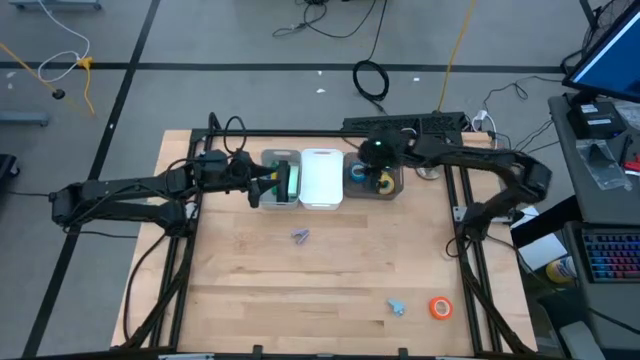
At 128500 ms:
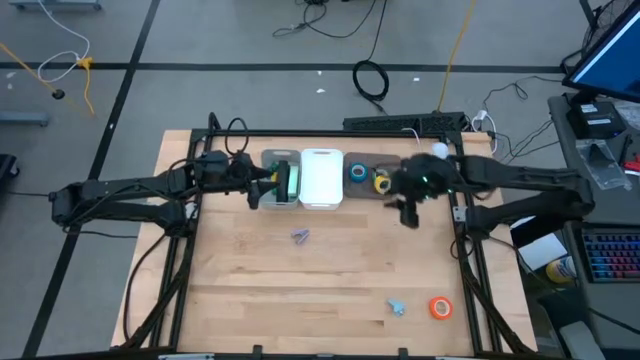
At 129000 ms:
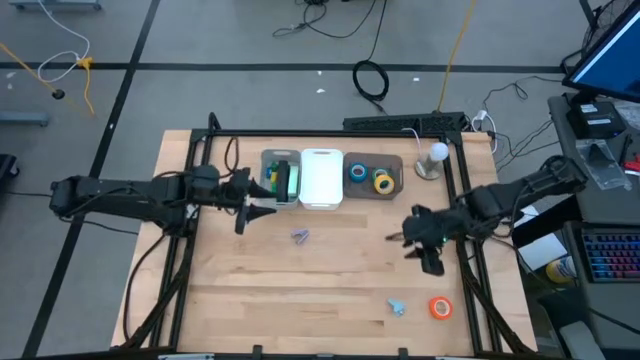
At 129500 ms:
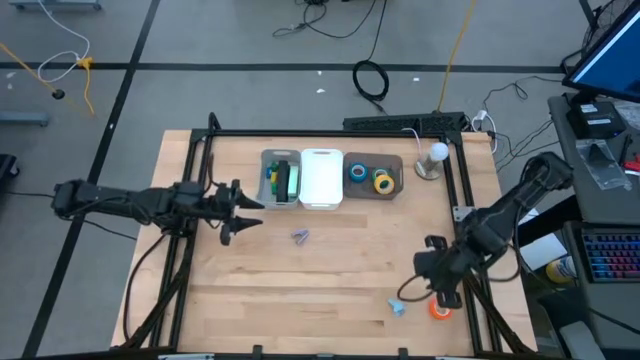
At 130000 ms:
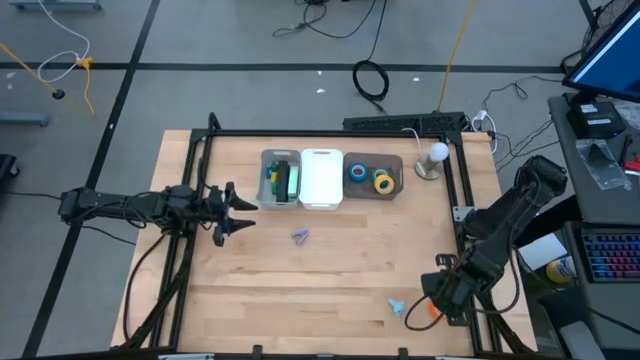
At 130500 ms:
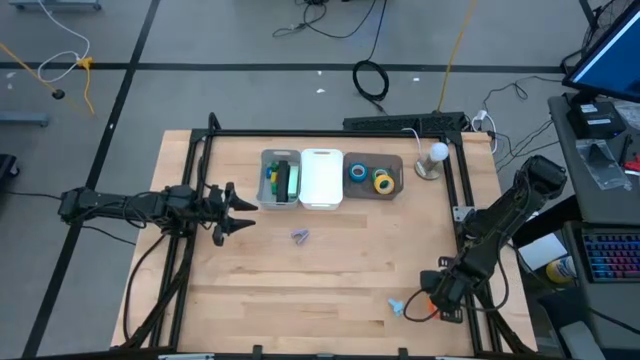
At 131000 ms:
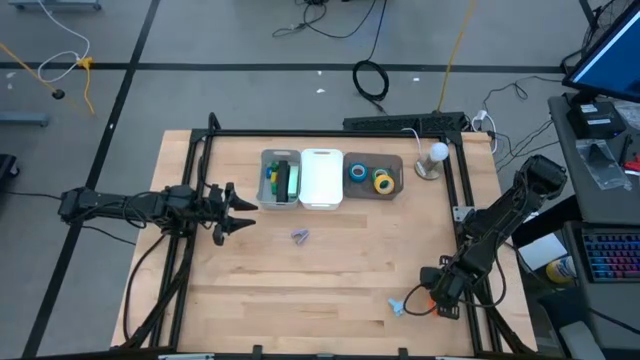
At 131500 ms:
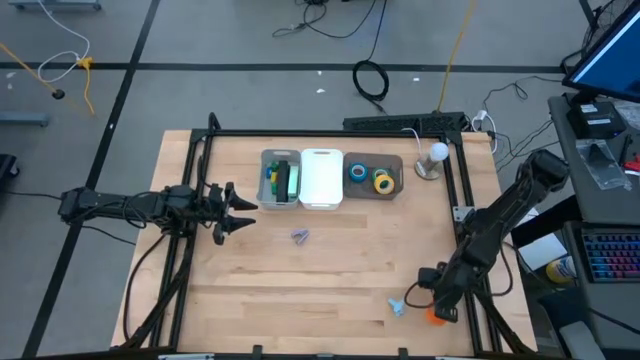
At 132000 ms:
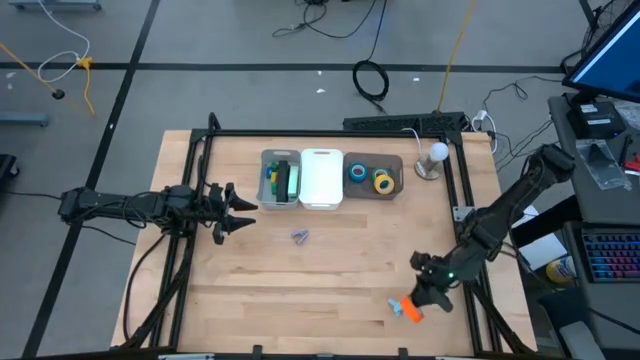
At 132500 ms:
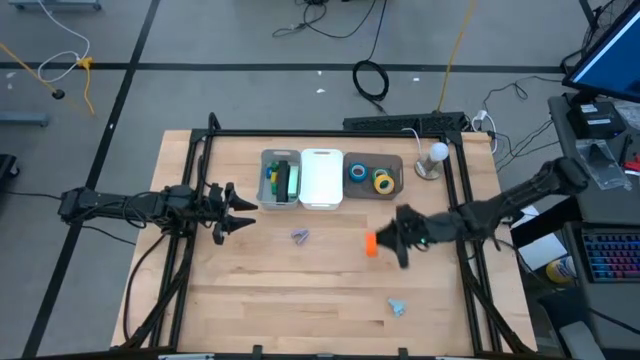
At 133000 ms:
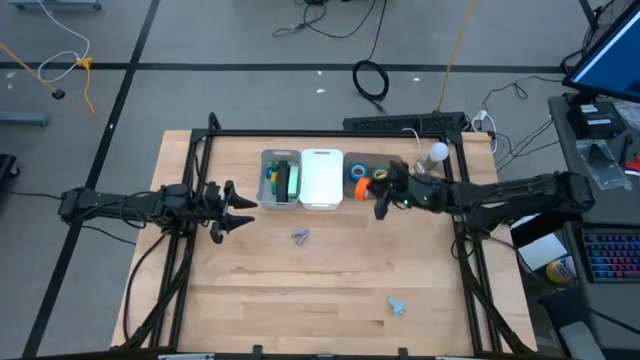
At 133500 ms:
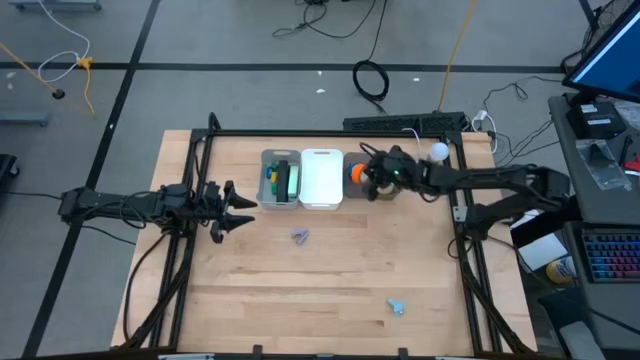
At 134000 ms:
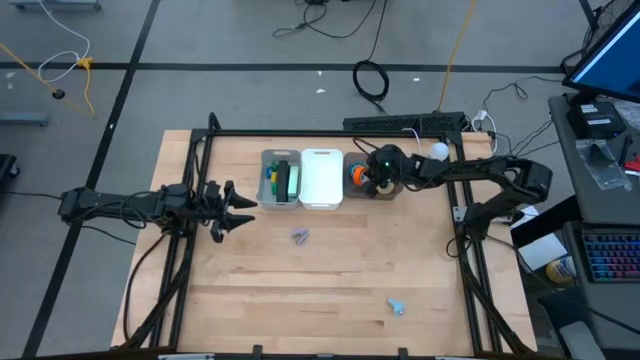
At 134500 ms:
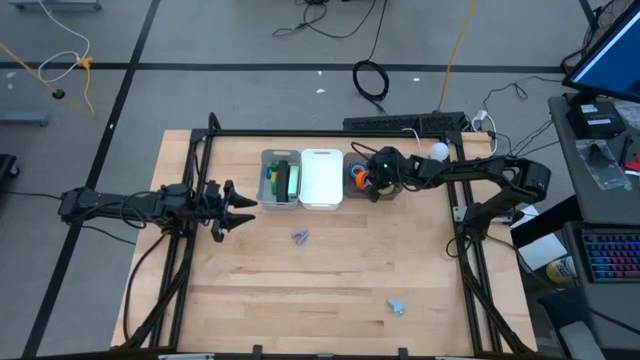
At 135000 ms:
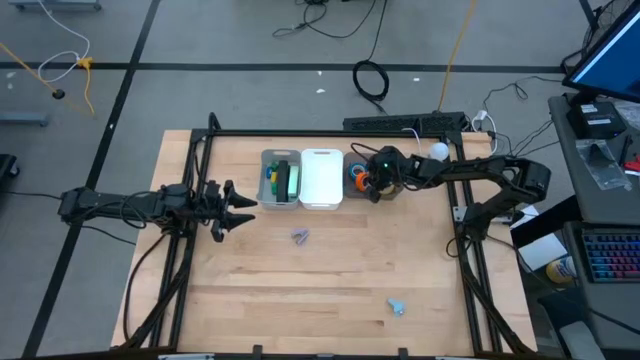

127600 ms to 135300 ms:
Task: Pick and place Stapler, Stapler remover, tape
Put the orange tape into the black bin

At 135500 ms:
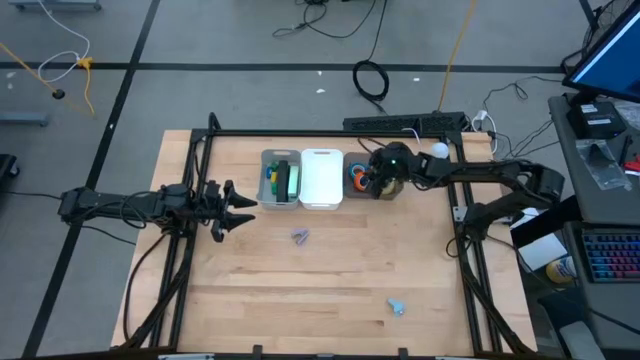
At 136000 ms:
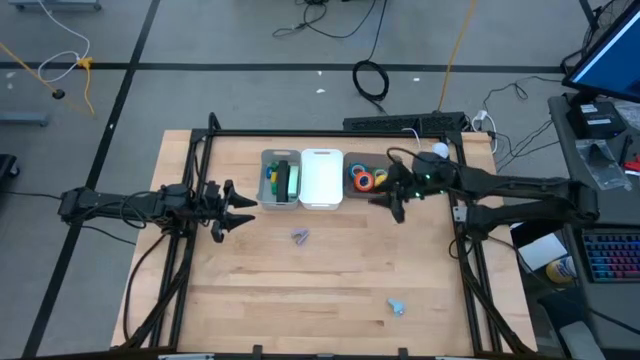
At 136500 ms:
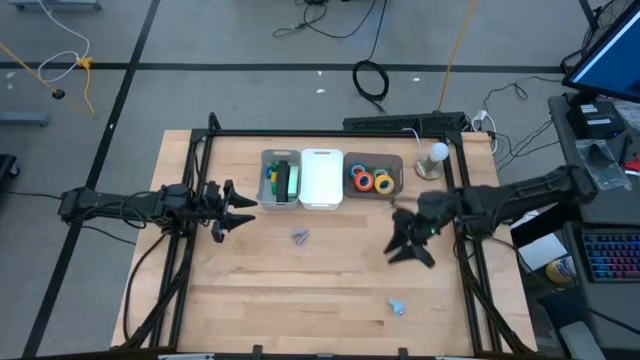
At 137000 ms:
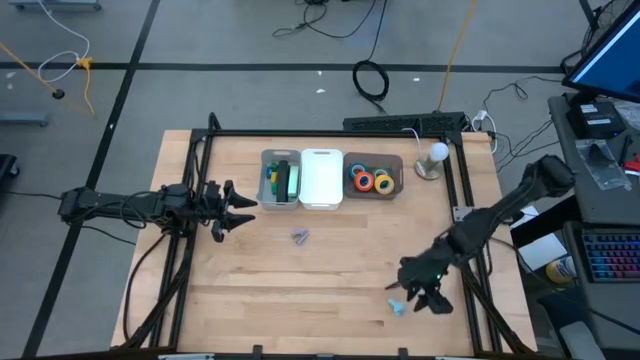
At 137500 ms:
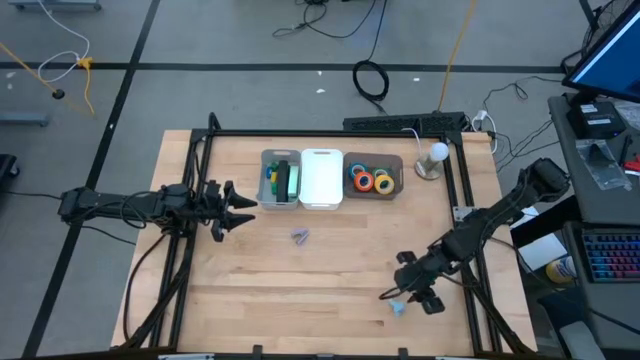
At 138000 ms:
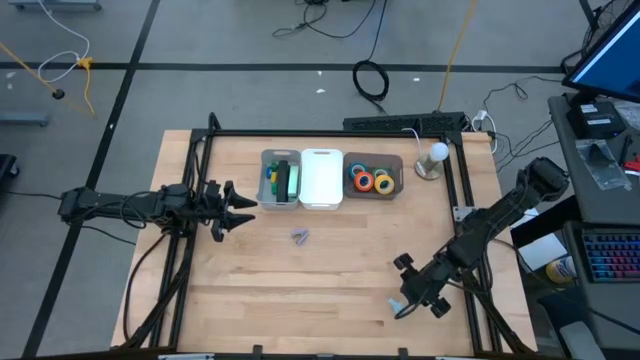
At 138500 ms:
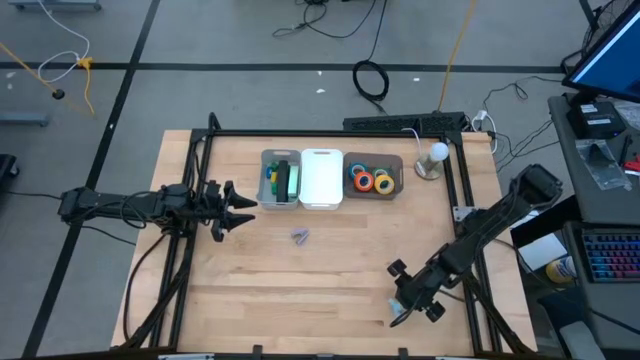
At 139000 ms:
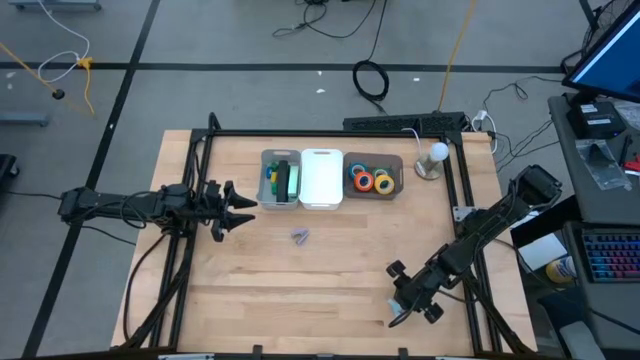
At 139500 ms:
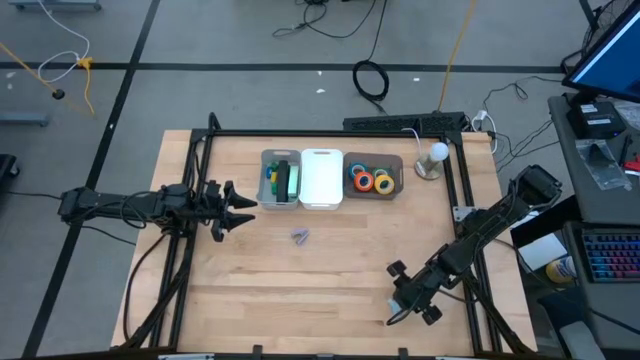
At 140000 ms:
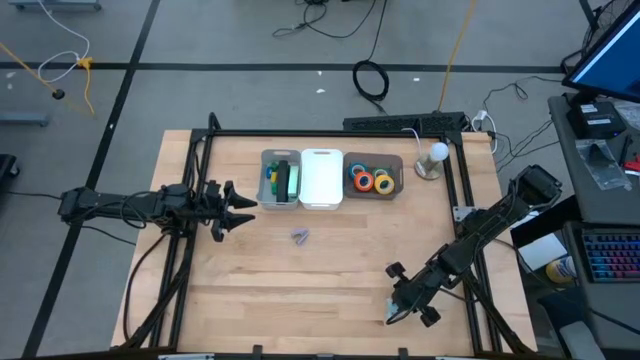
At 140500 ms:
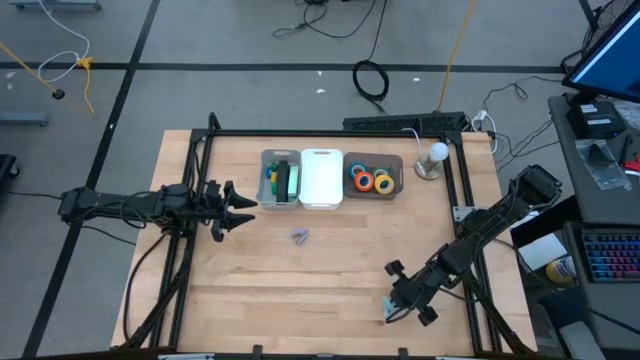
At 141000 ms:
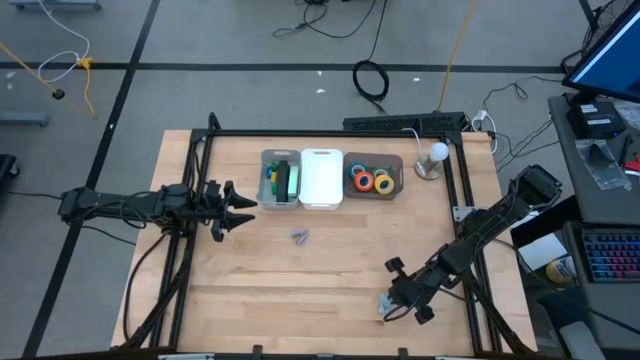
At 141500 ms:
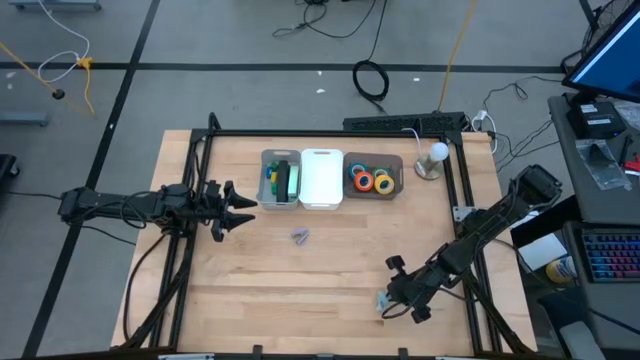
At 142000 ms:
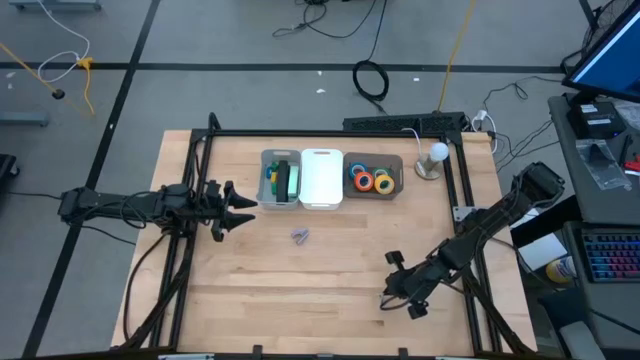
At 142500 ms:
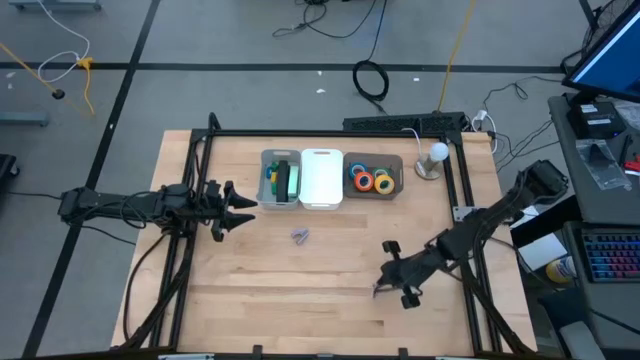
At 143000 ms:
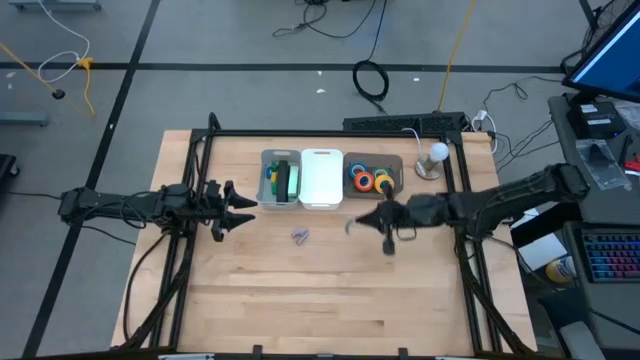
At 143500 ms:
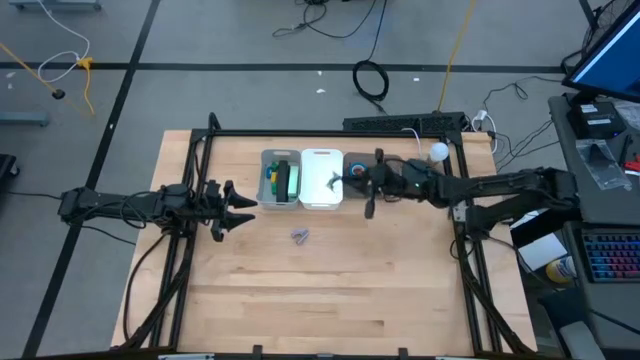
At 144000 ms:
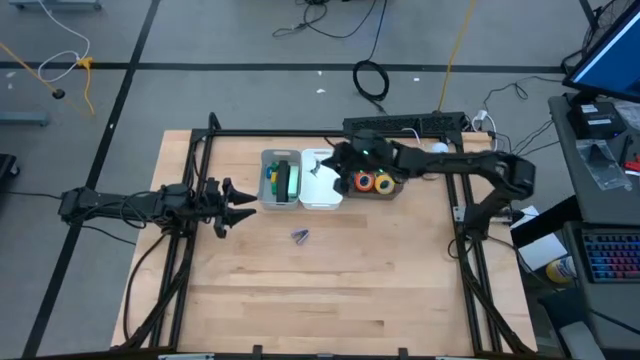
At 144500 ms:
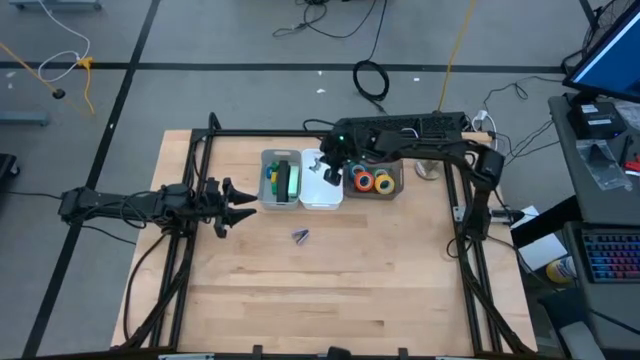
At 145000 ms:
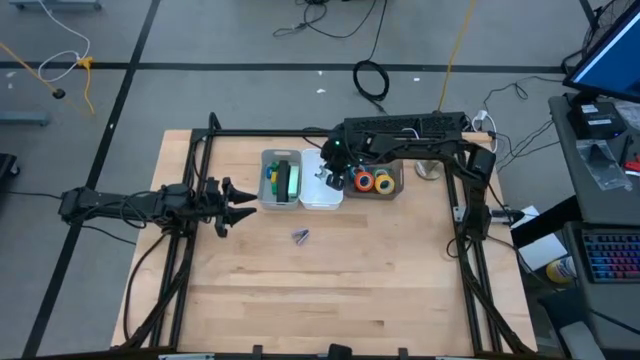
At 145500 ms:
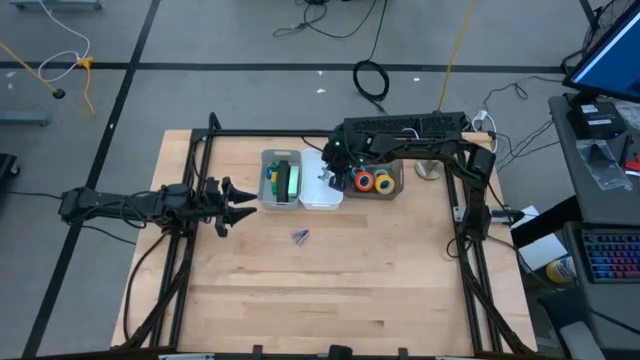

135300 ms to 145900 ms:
Put the blue staple remover into the white bin

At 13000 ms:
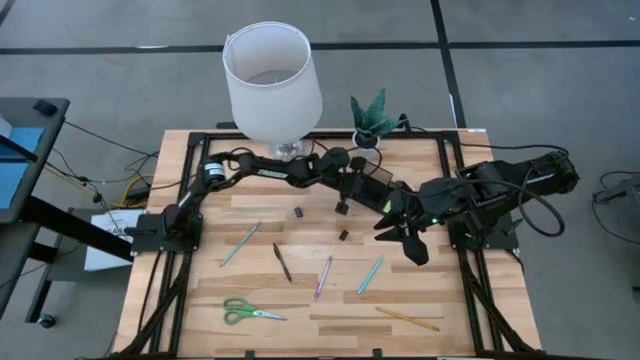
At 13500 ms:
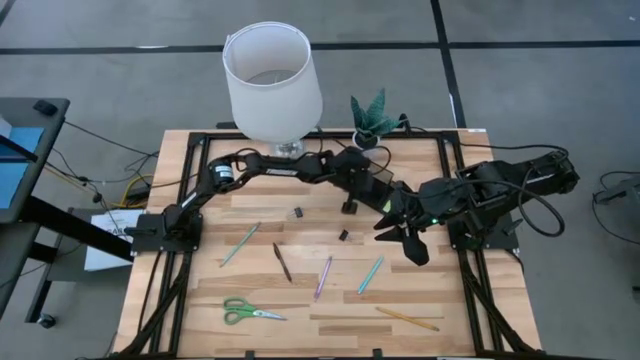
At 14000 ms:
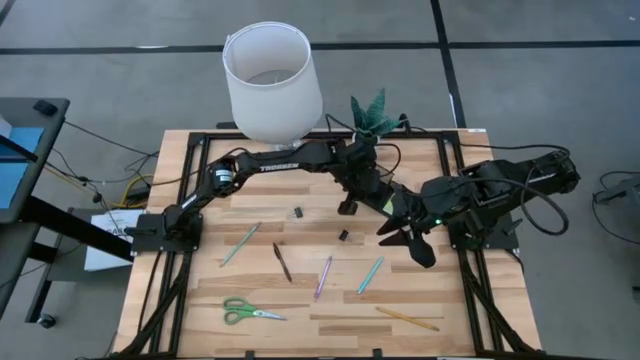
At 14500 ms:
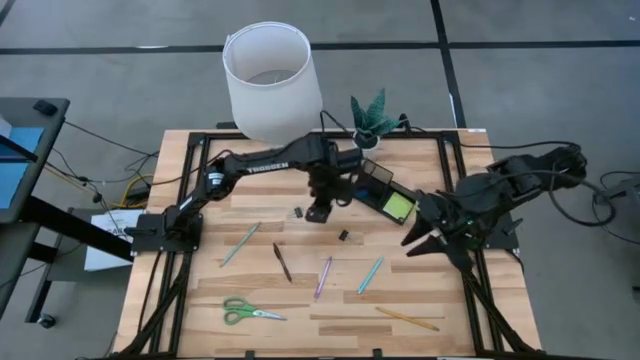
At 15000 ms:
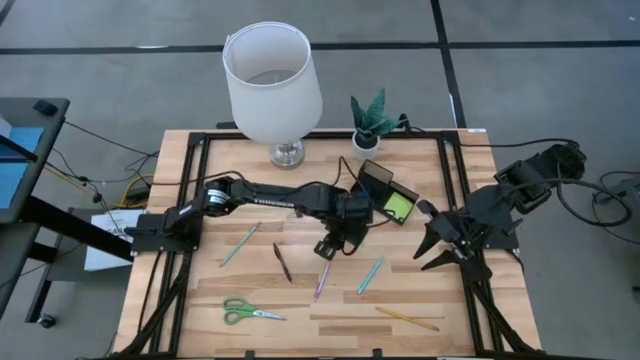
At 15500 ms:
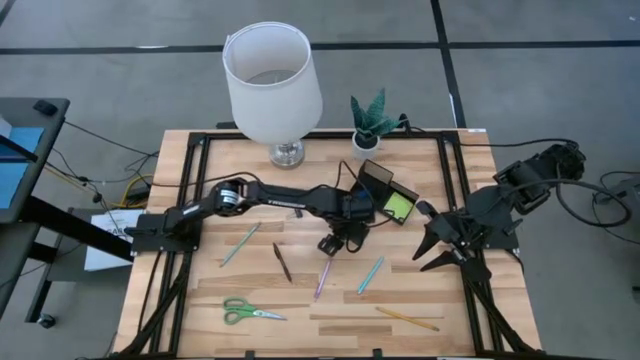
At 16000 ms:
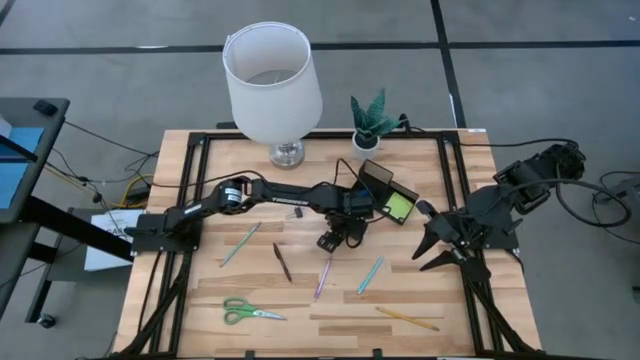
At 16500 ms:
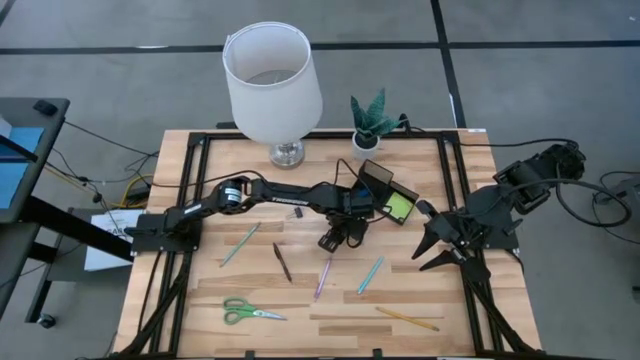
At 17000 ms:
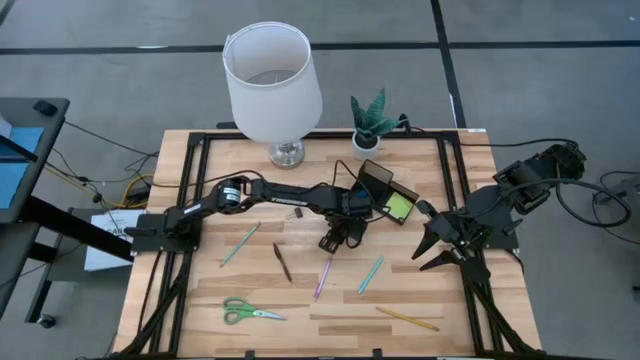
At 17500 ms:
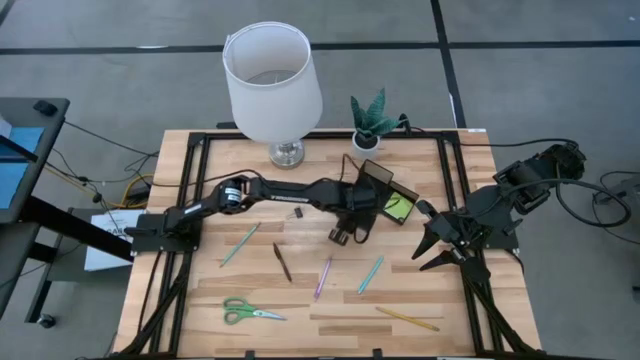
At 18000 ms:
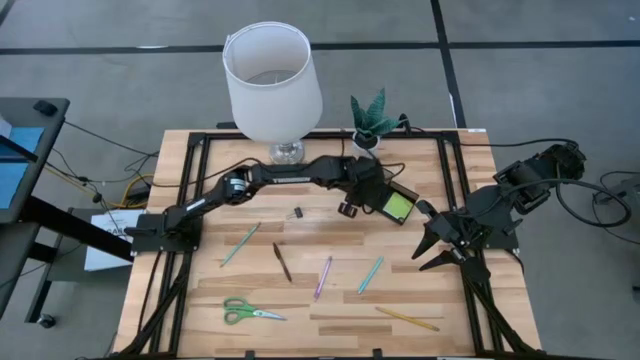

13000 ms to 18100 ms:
Task: Pick and place office supplies into organizer
Put the right black binder clip into the black organizer
